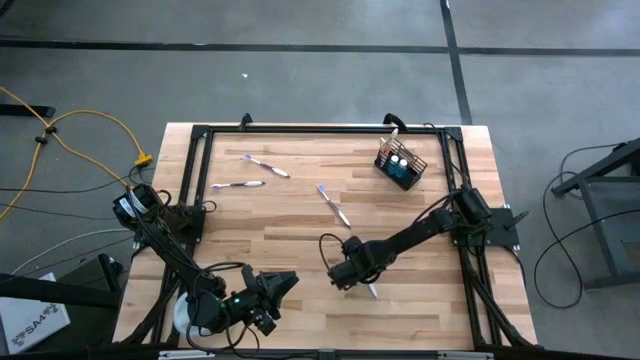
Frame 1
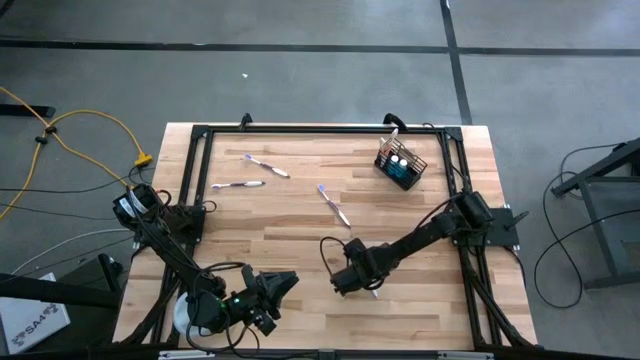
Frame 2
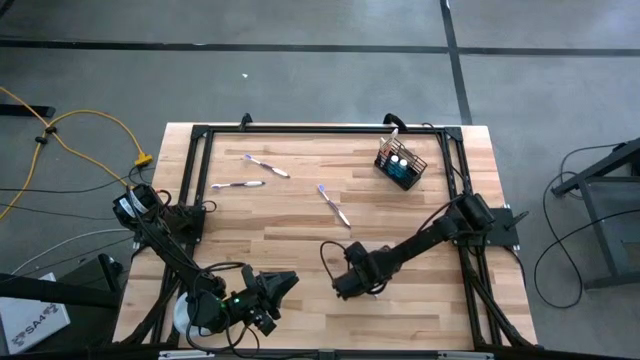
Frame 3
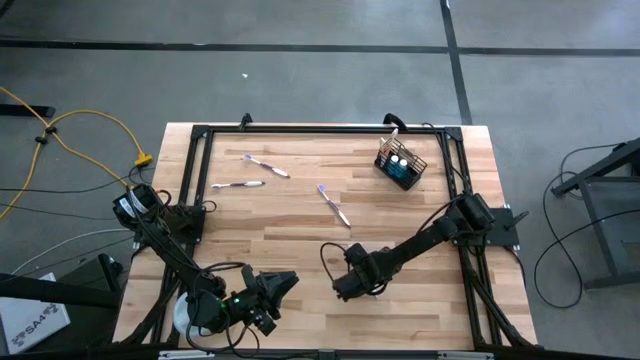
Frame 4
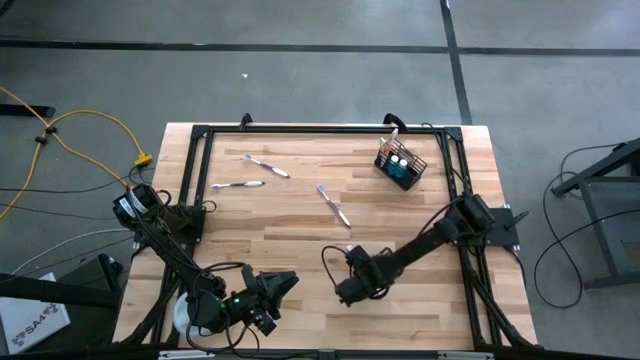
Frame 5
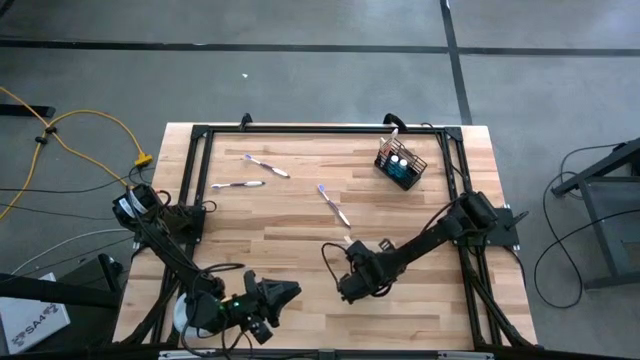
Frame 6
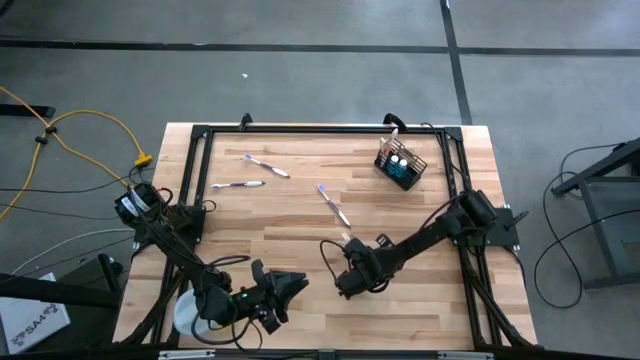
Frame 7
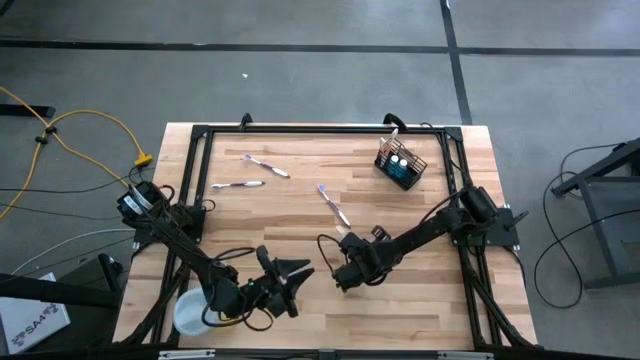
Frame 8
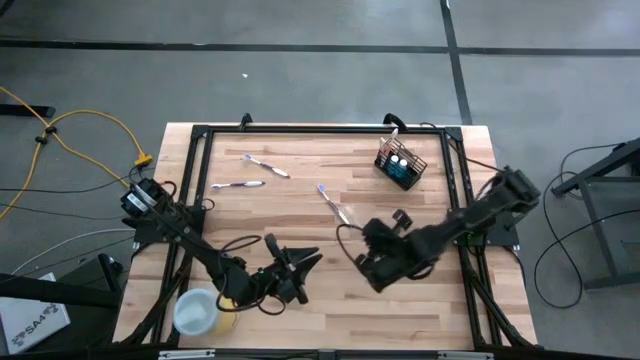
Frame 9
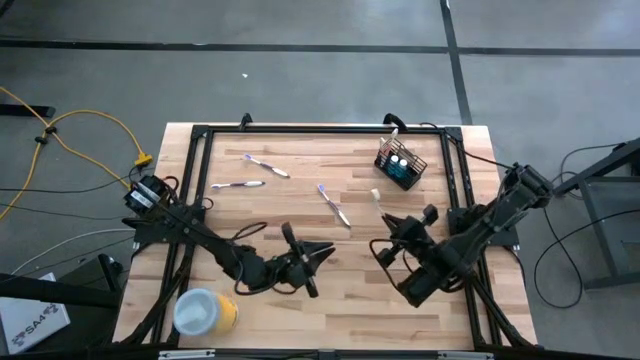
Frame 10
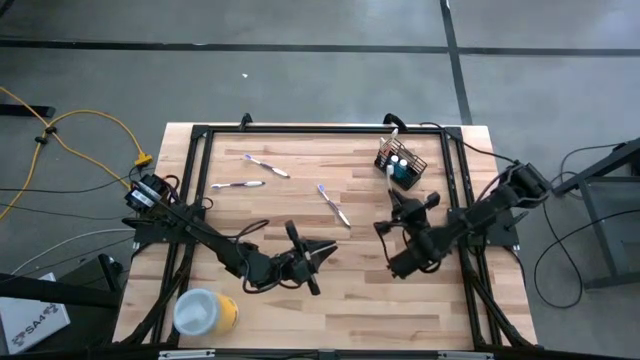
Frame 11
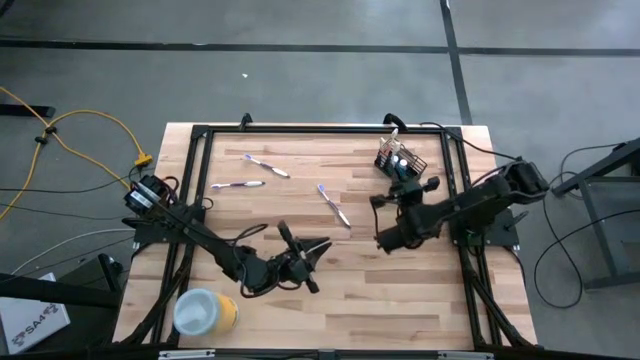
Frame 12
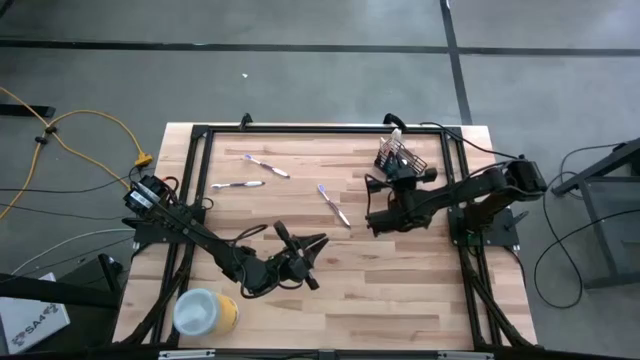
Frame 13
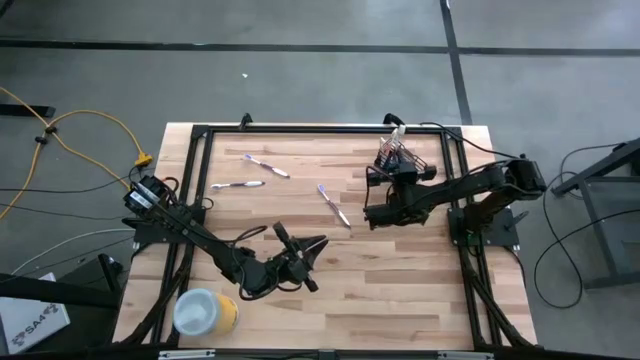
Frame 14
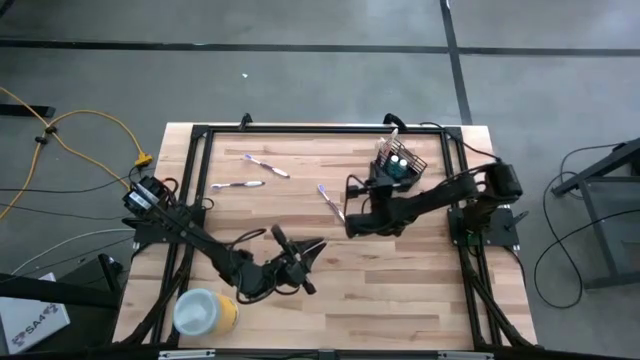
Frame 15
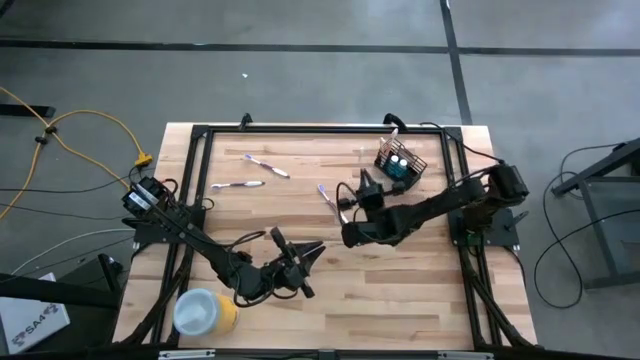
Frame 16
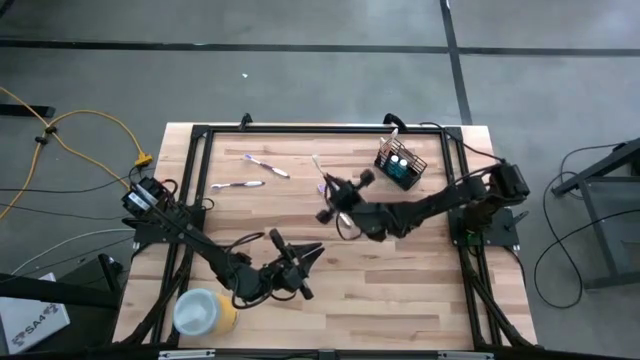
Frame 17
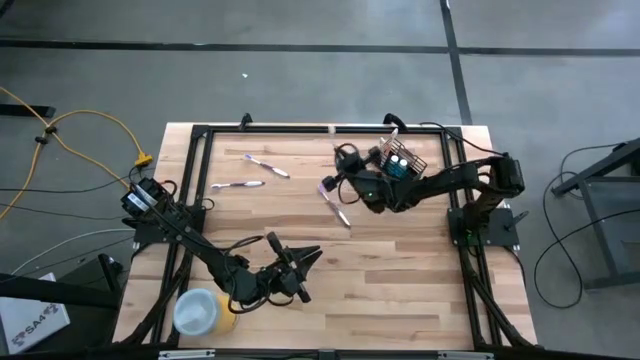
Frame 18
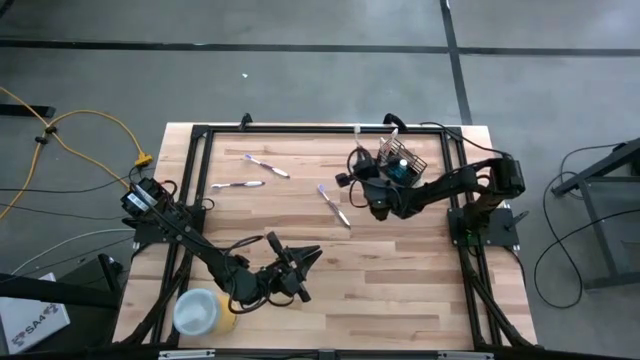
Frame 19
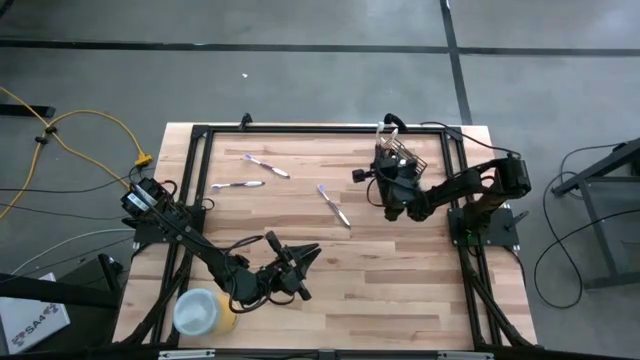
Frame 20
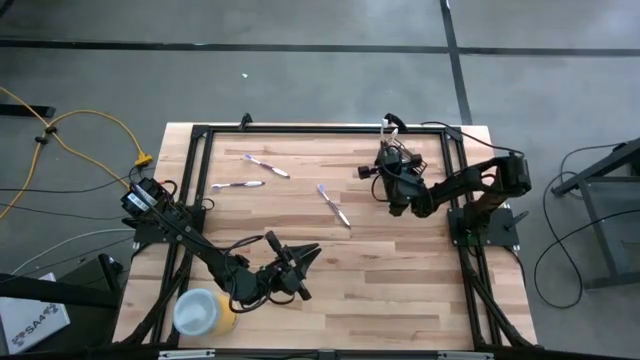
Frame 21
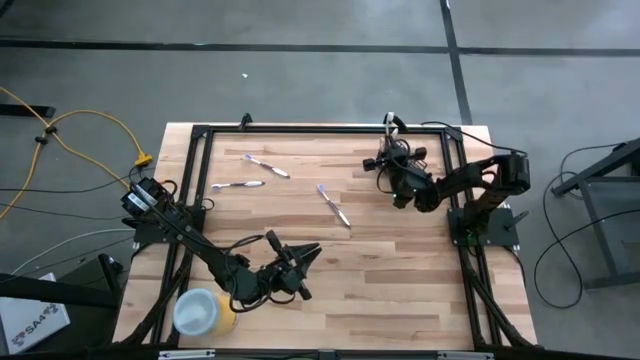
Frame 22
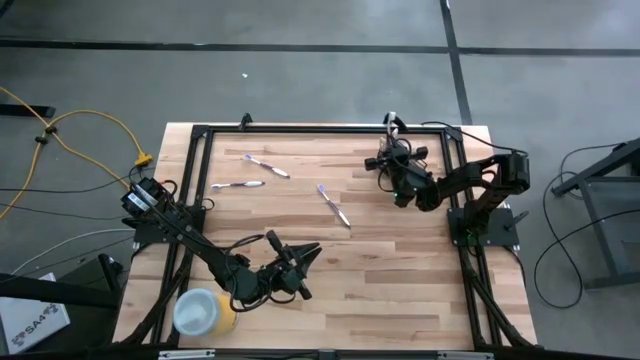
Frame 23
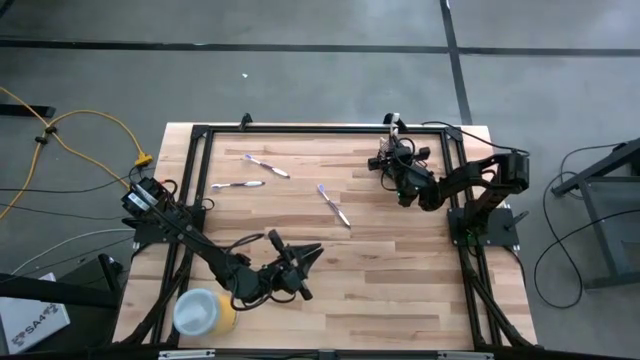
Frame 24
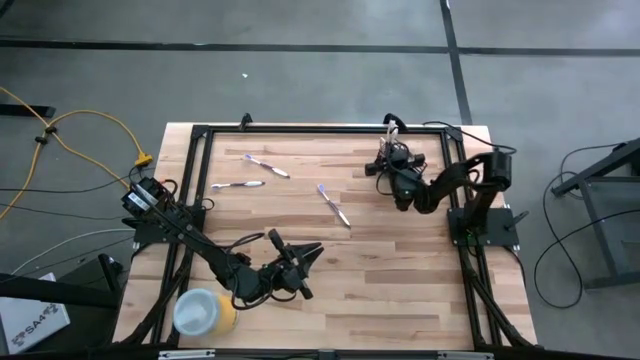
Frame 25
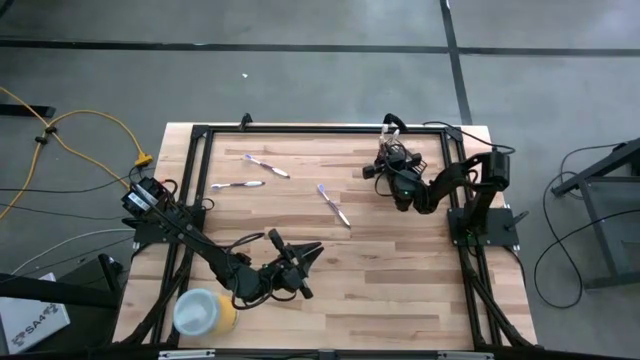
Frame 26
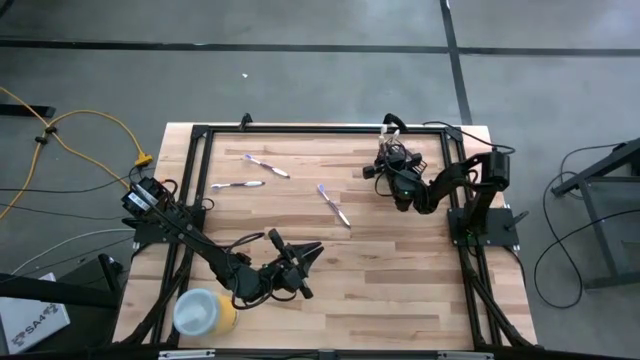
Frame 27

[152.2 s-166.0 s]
Task: Pick & Place toothbrushing station
Put the orange toothbrush into the left of the black mesh organizer
